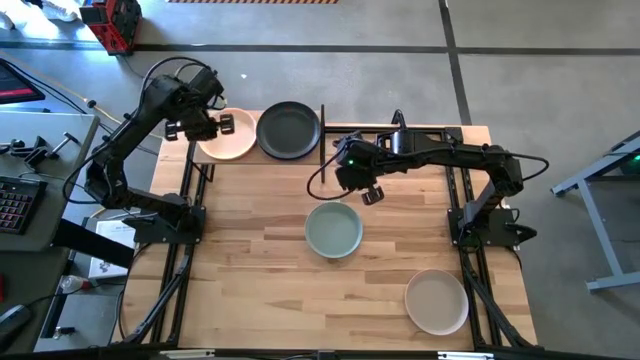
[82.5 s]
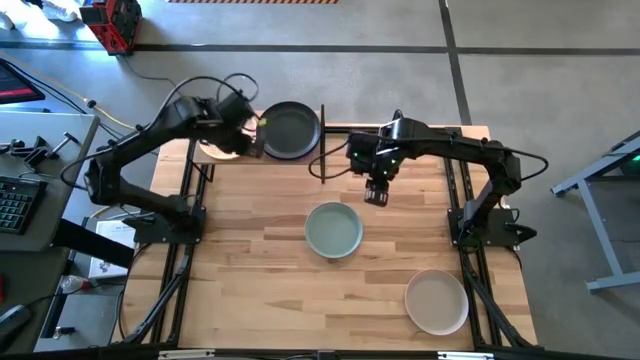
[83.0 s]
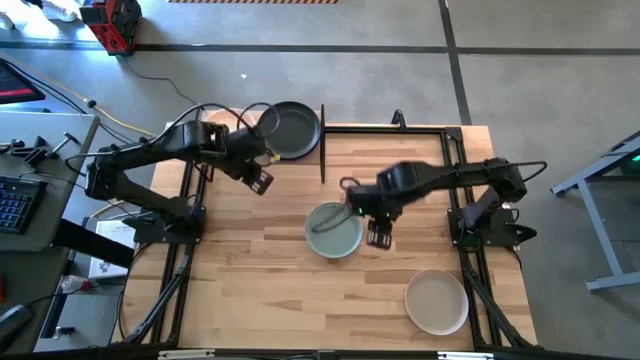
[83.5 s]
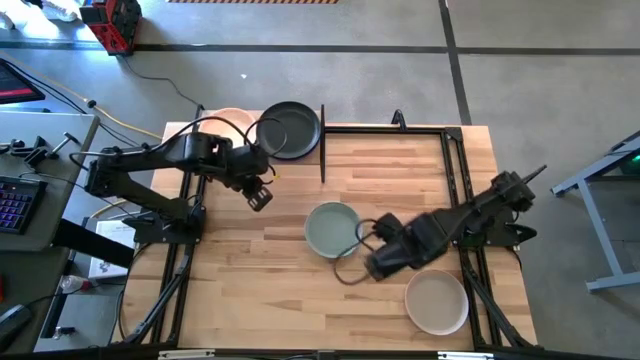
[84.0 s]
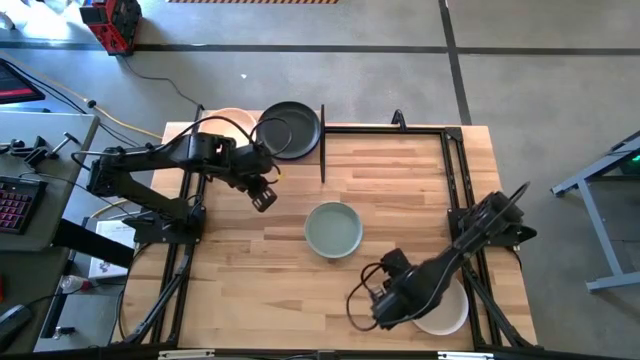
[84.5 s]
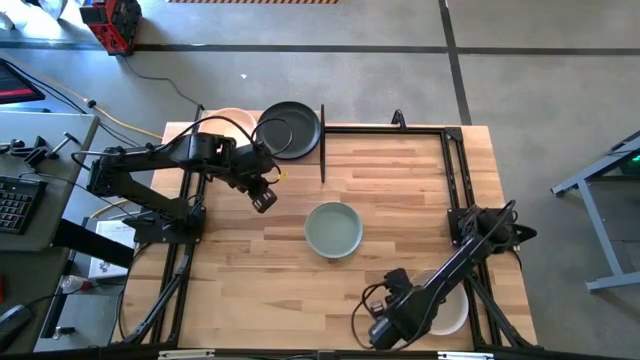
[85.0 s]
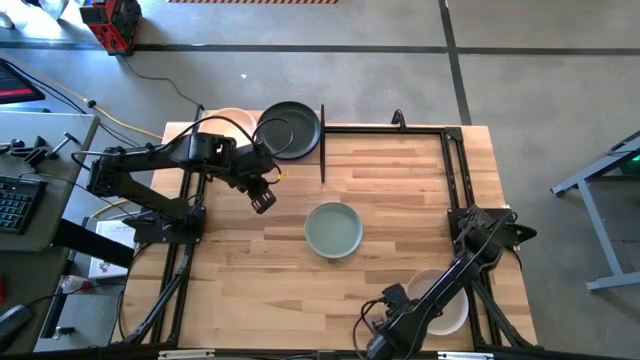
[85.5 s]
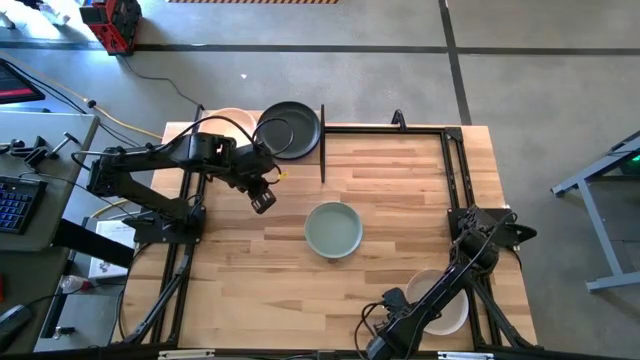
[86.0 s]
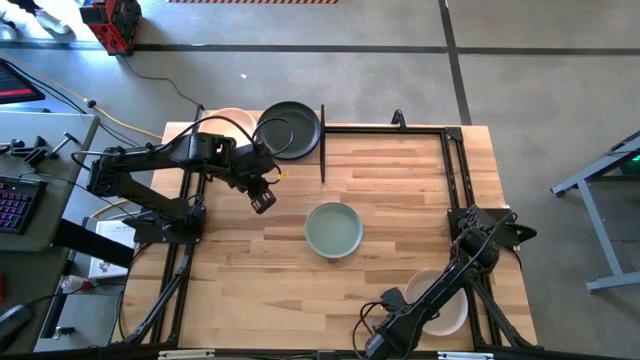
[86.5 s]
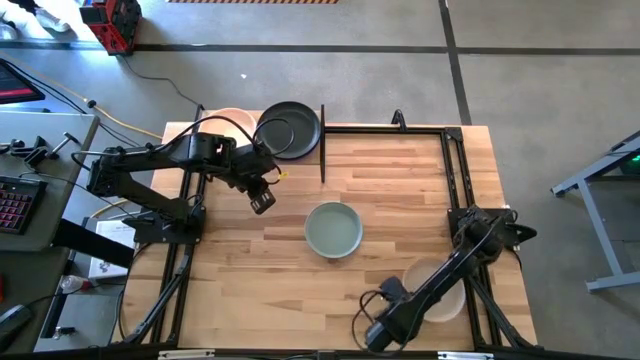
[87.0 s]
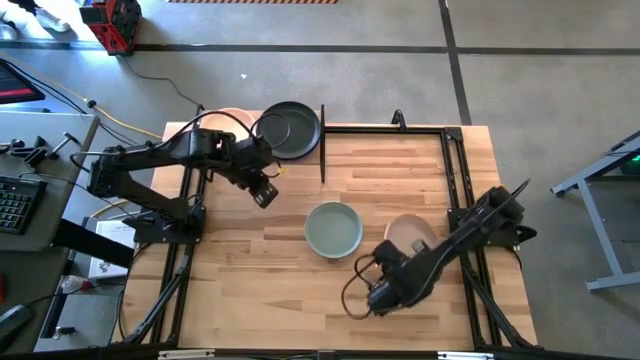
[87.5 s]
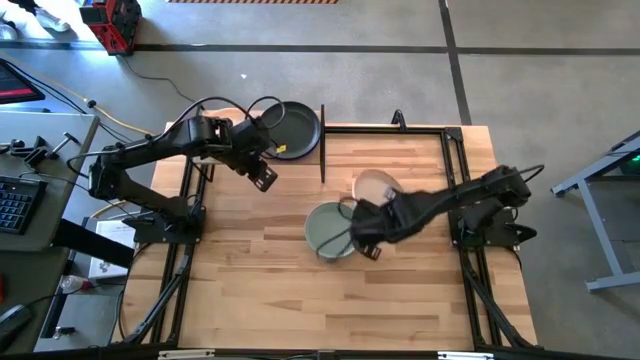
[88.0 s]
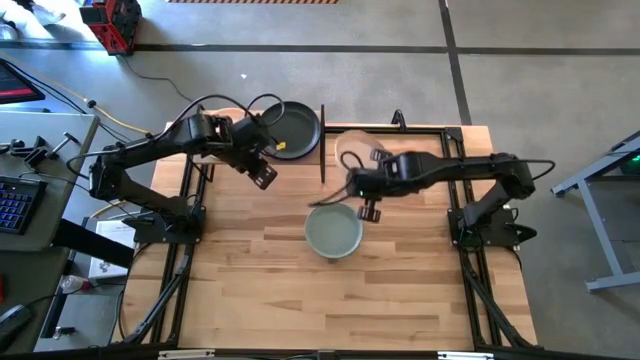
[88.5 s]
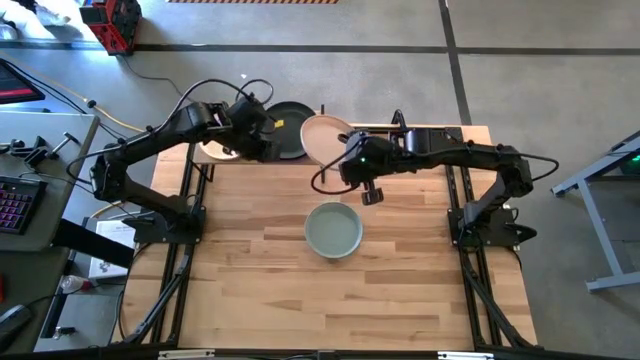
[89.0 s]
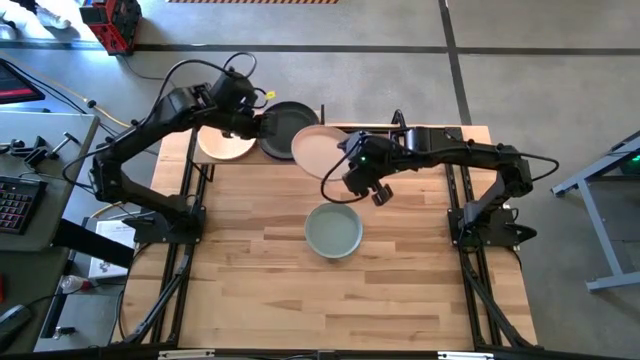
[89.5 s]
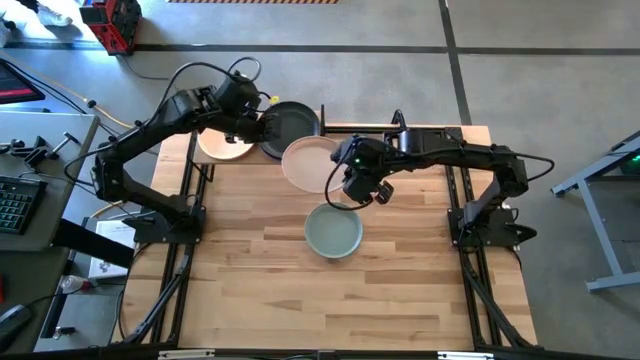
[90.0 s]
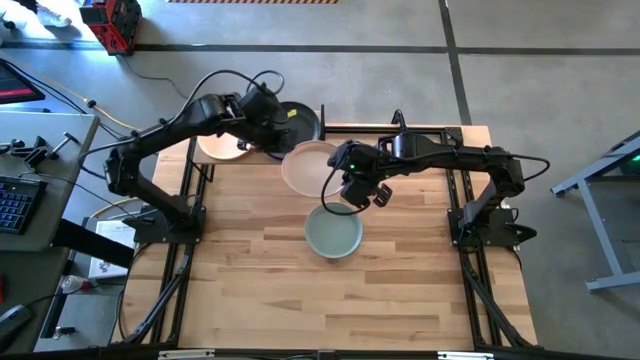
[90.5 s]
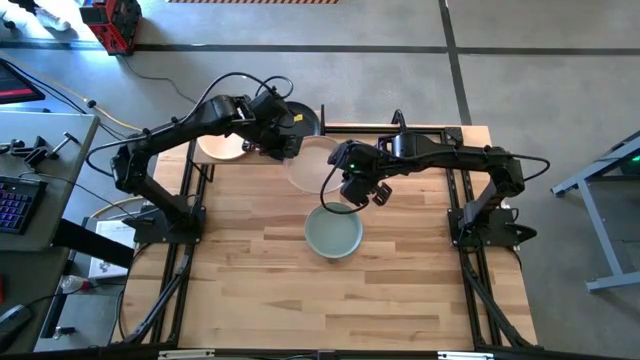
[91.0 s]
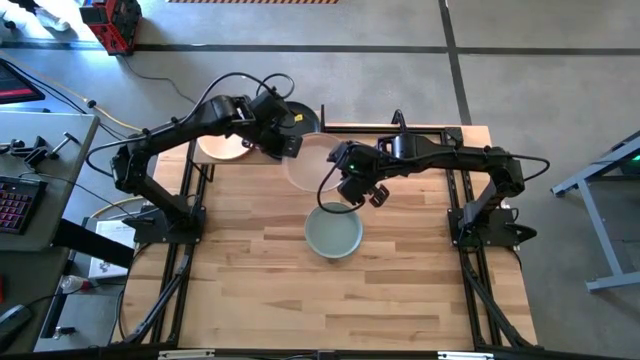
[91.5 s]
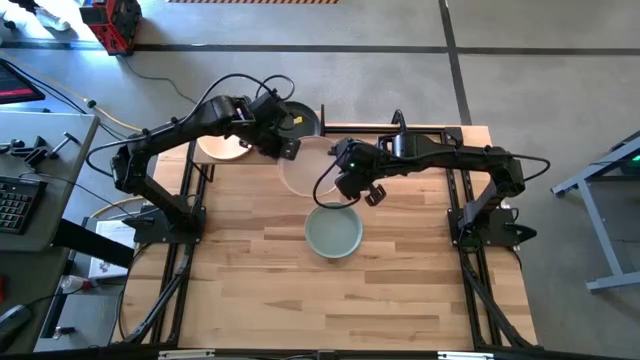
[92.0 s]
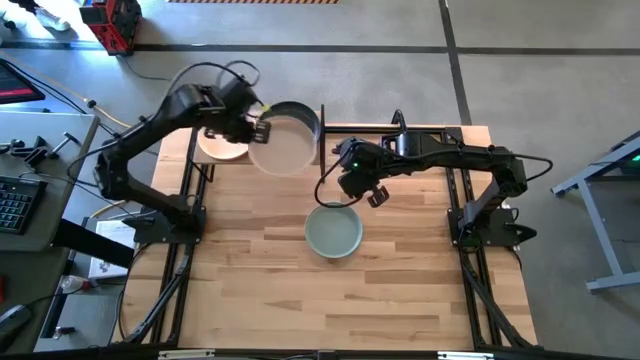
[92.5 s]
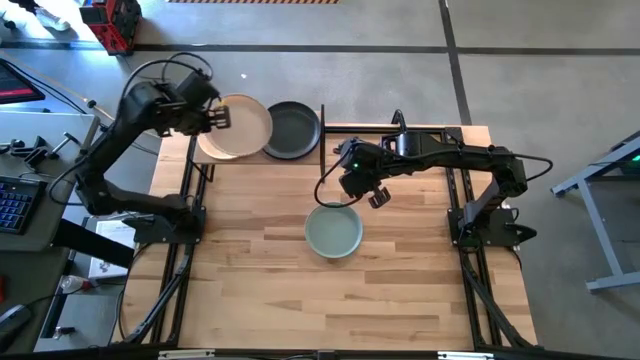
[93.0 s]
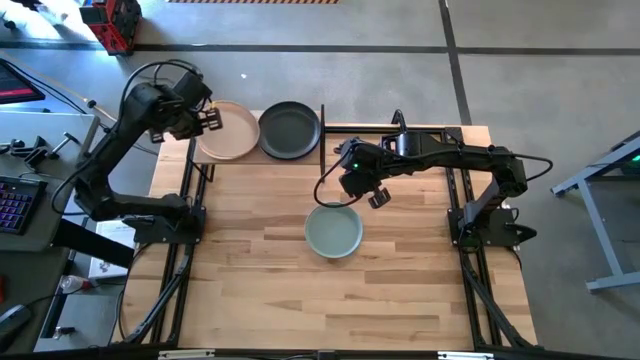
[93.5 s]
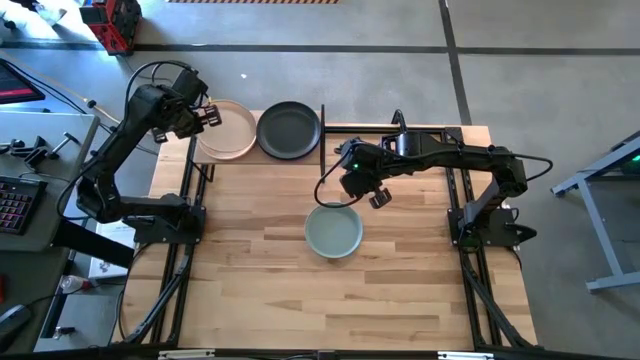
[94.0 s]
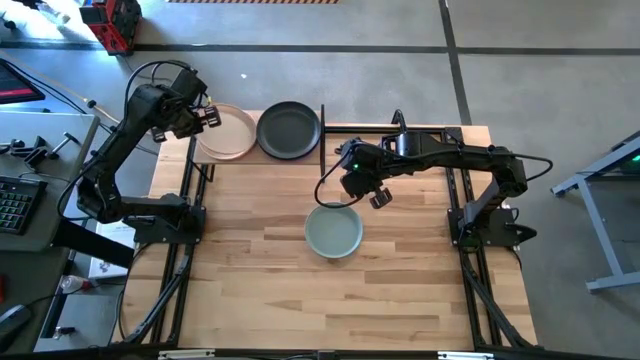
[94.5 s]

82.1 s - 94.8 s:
Task: Place and stack plates onto a shelf
Stack the gray plate on top of the light orange plate on the shelf

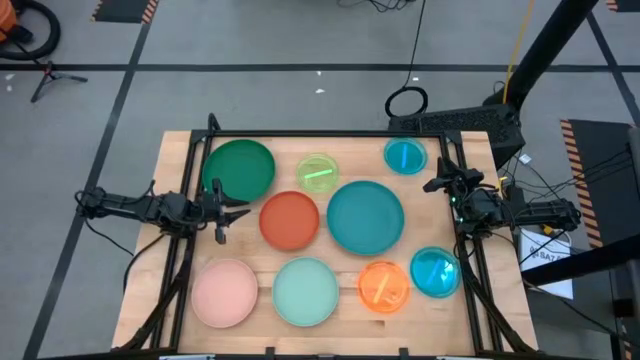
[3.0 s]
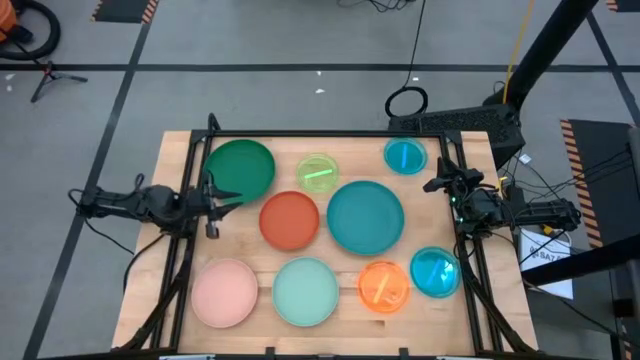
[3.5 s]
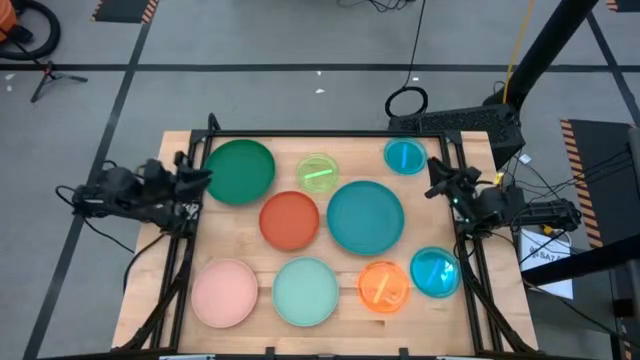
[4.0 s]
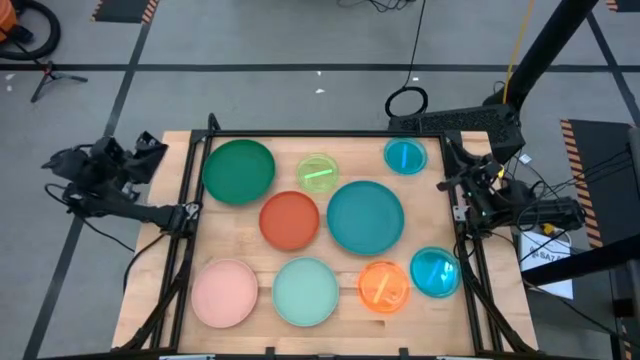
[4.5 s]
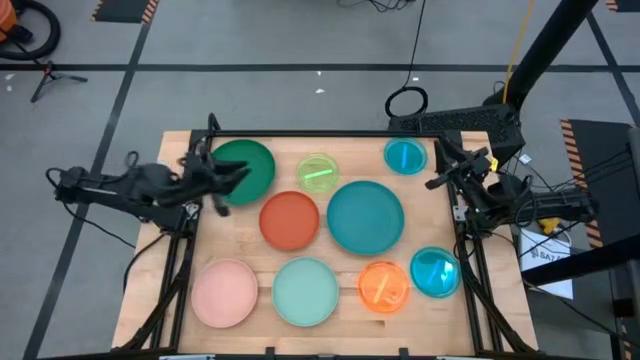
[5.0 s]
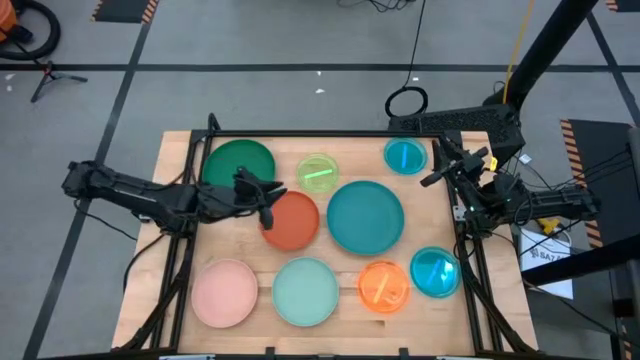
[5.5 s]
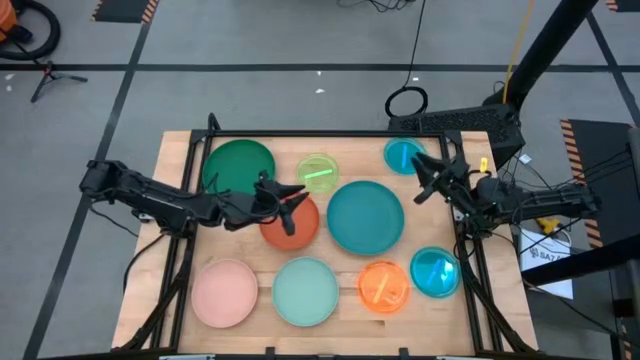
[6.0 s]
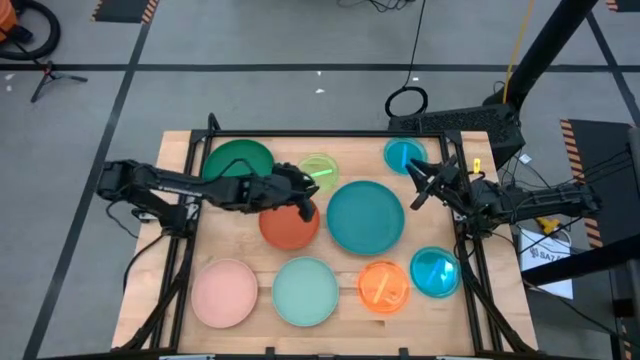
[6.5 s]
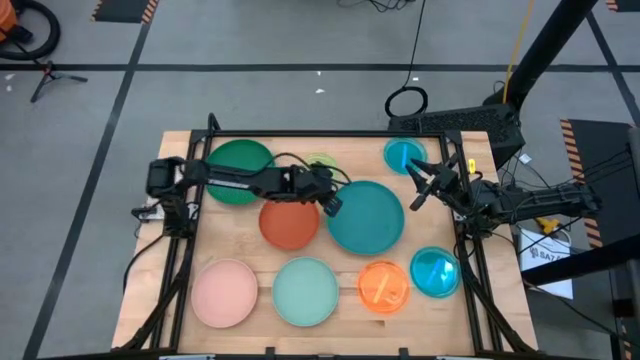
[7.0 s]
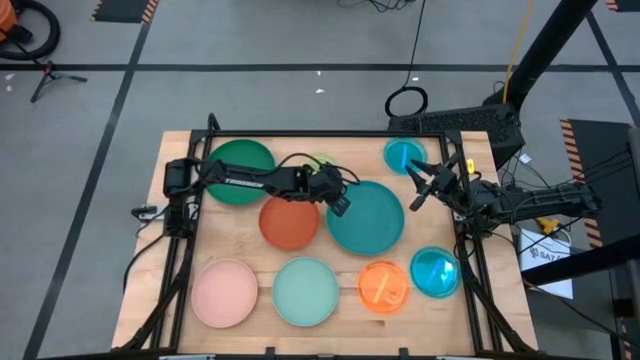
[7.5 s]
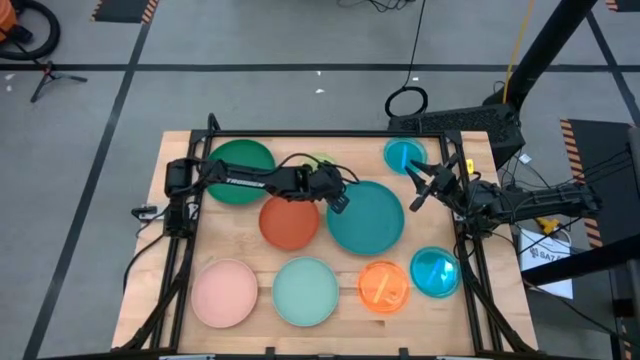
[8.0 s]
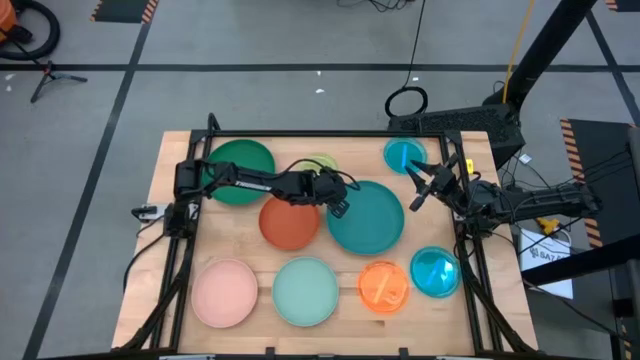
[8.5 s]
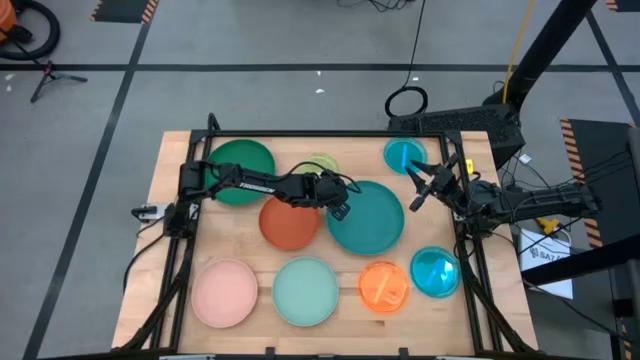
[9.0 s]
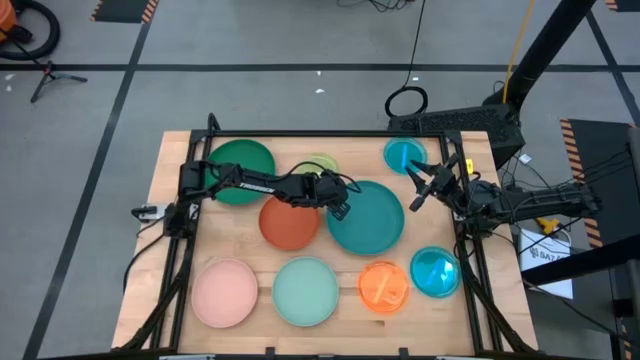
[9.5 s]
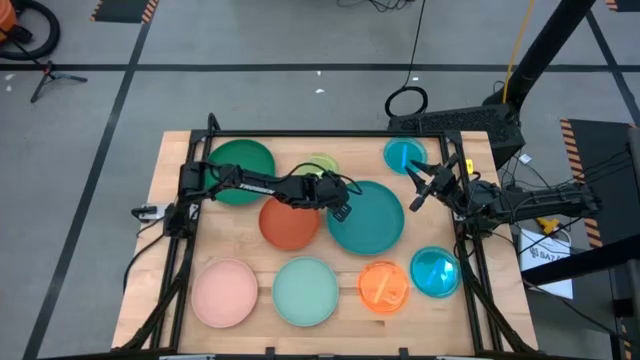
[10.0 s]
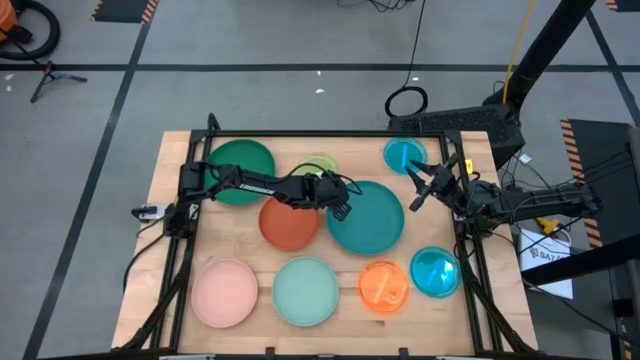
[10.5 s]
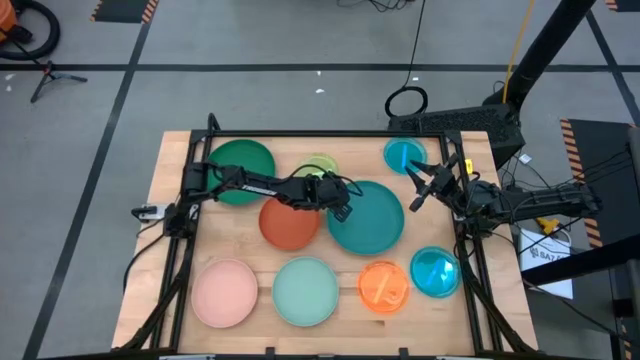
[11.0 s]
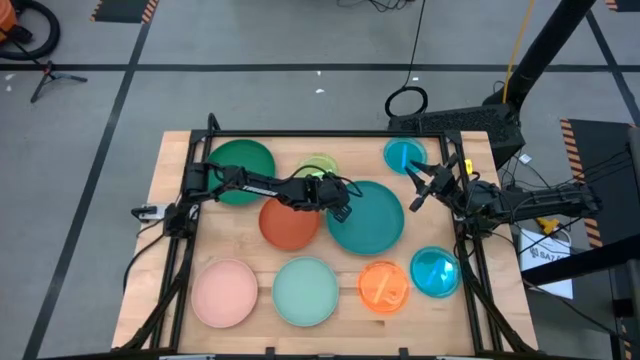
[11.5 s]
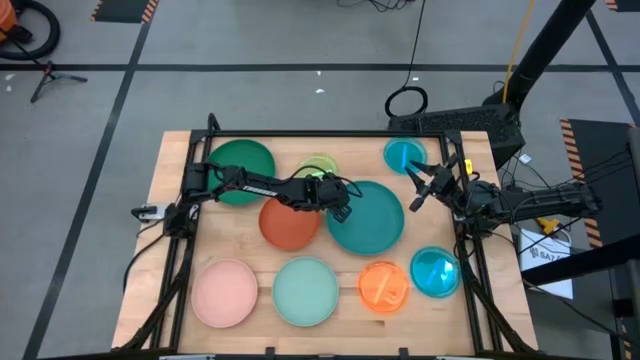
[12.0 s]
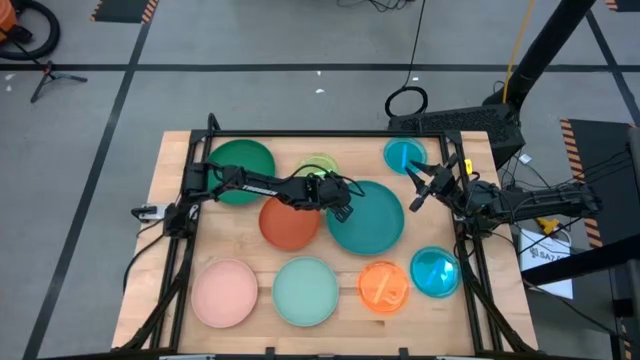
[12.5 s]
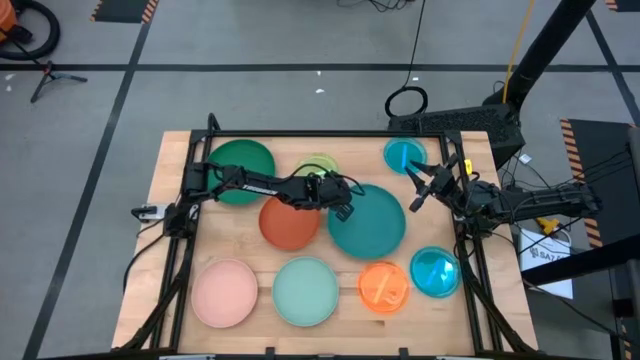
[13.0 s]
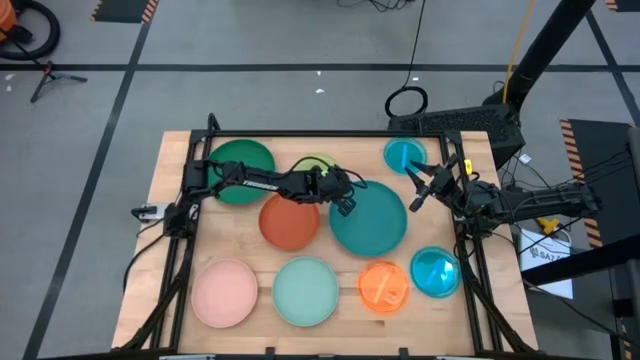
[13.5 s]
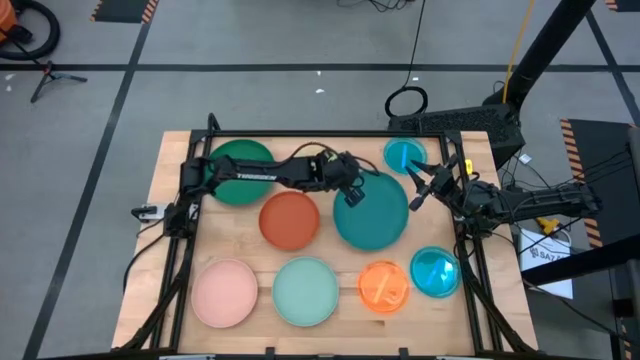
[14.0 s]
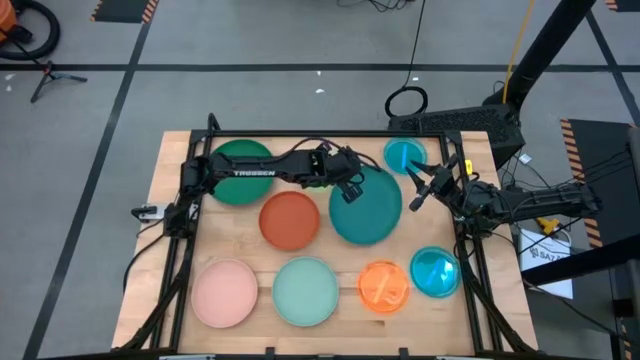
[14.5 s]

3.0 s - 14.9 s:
Task: Stack plastic plates
Stack the dark blue plate on top of the dark green plate
